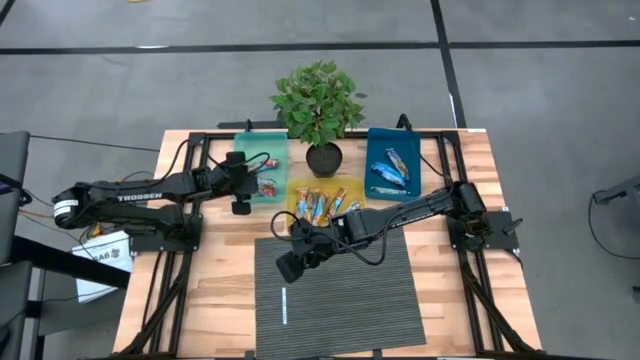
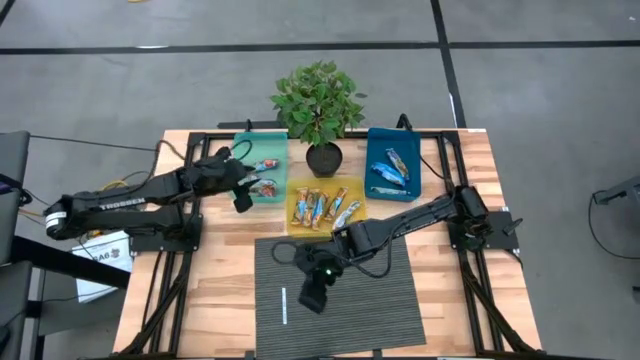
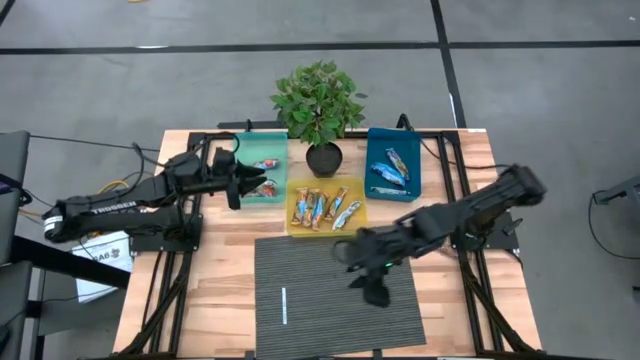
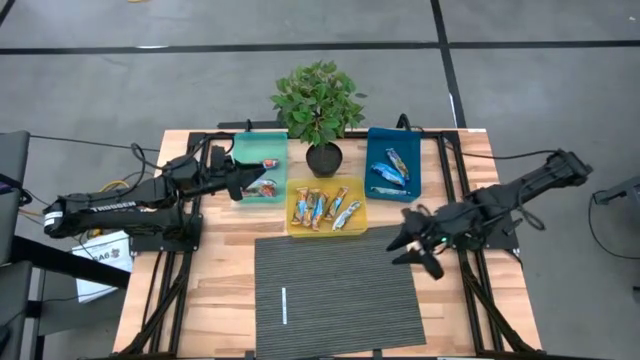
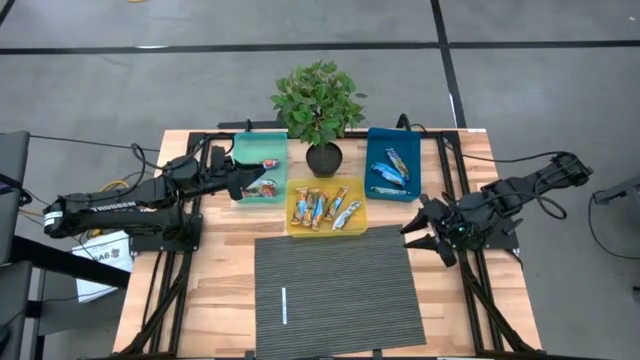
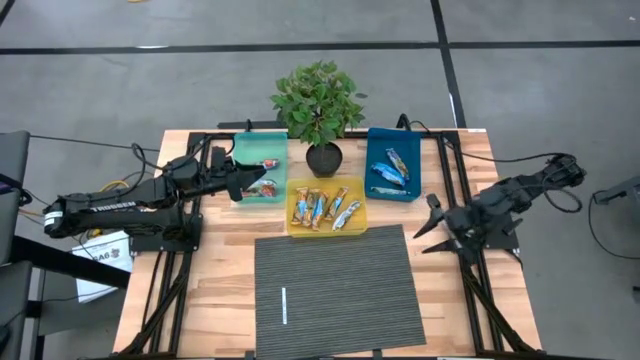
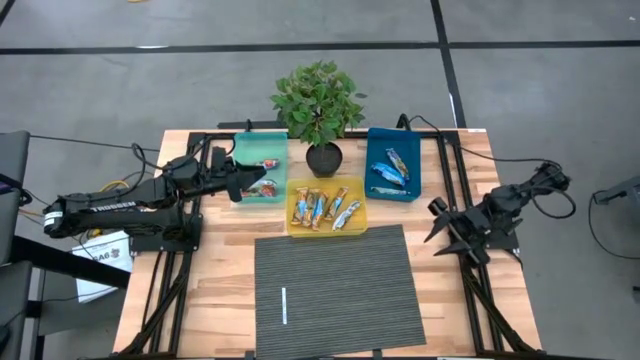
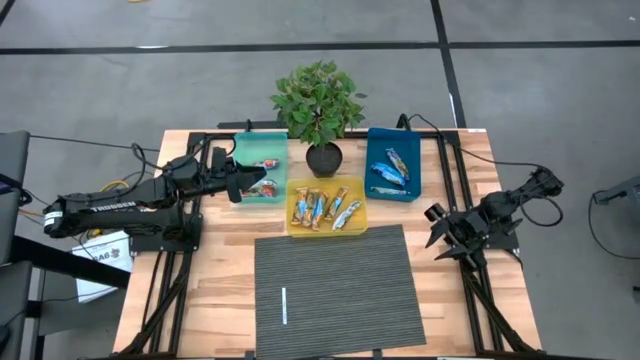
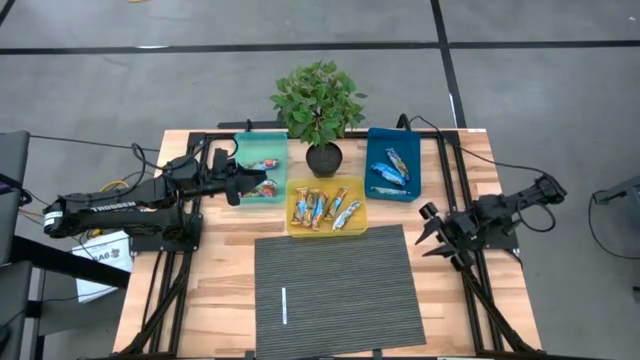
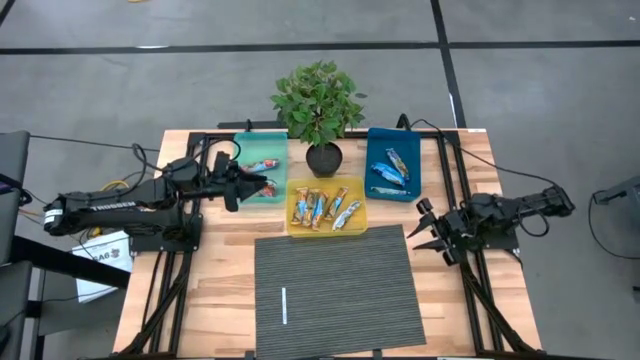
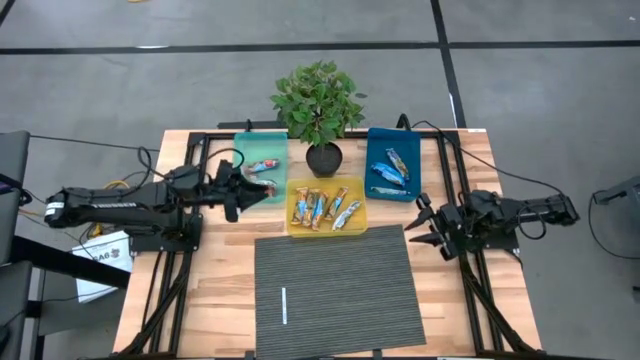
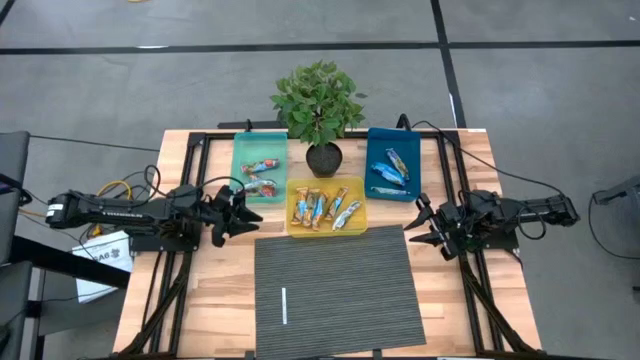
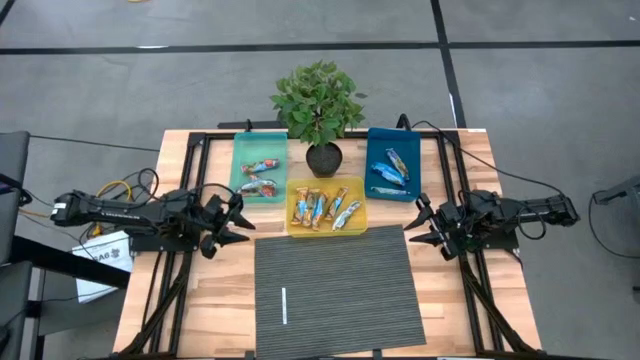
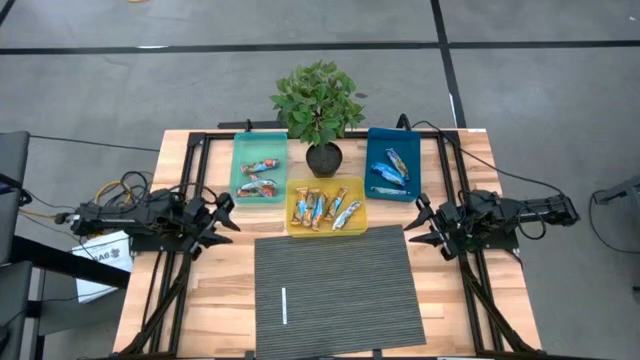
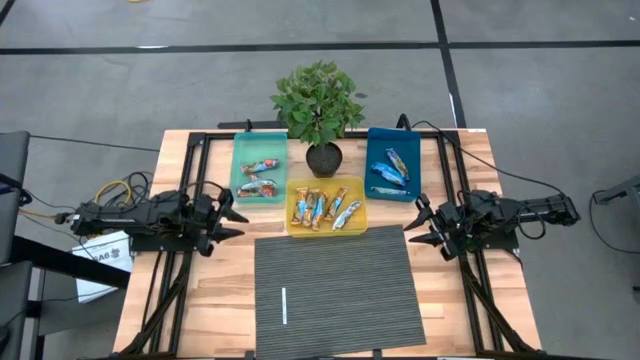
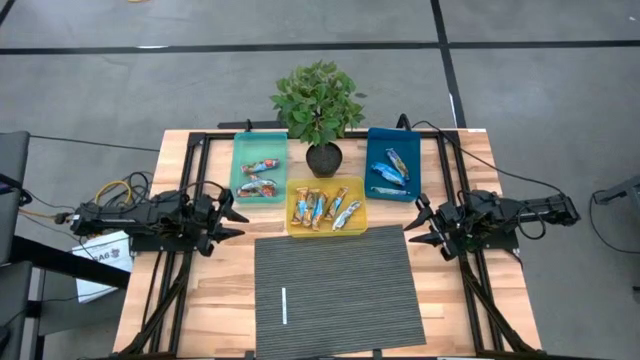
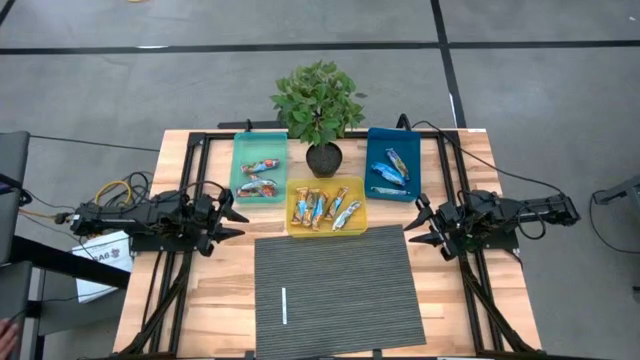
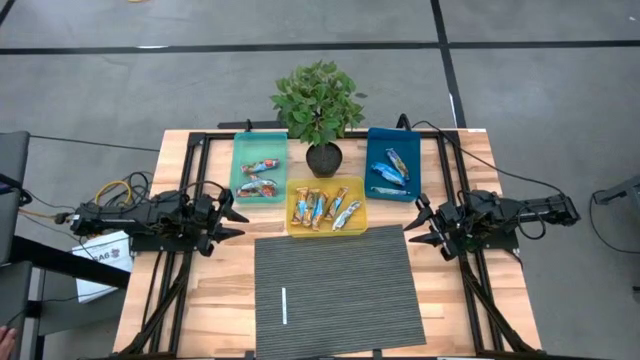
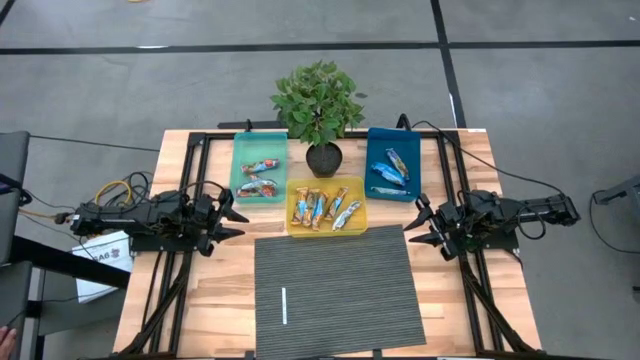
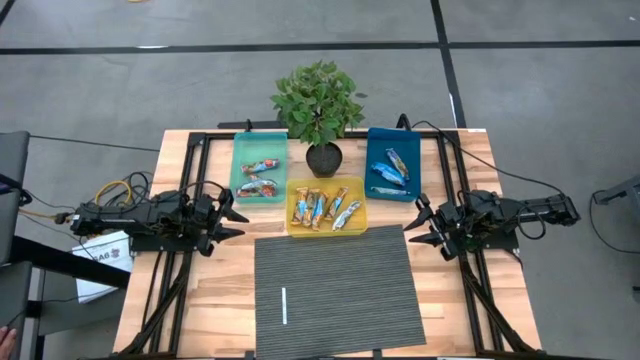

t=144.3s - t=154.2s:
Task: Pick and place Granola Bars by type
Return to Home Position

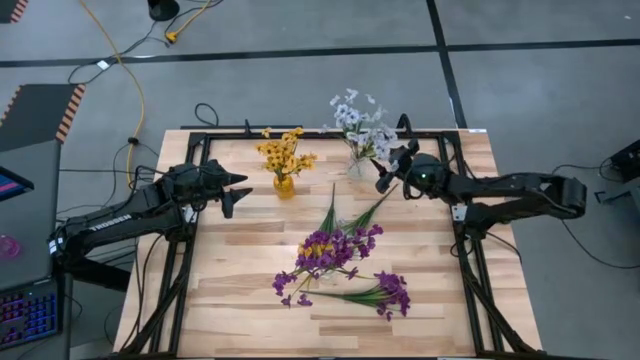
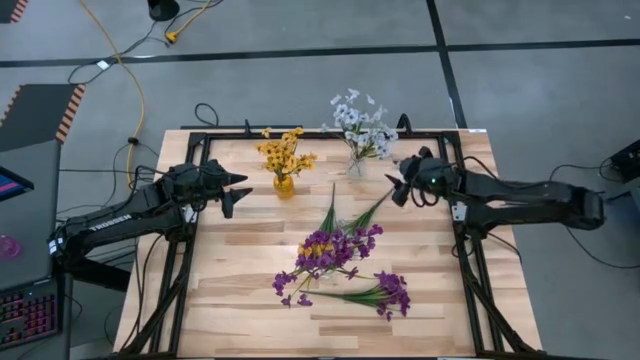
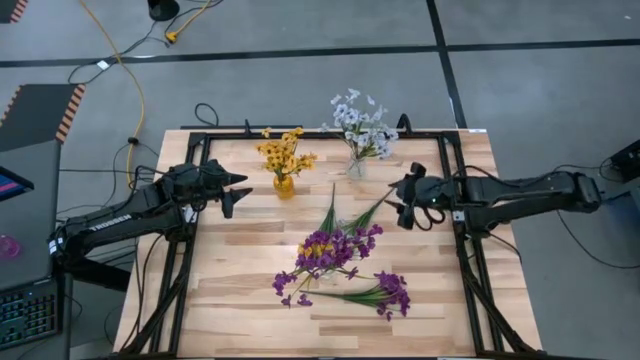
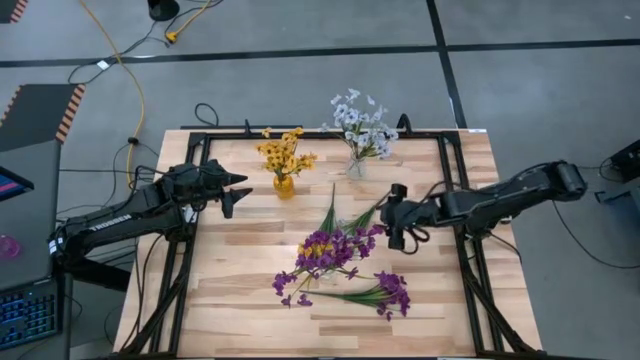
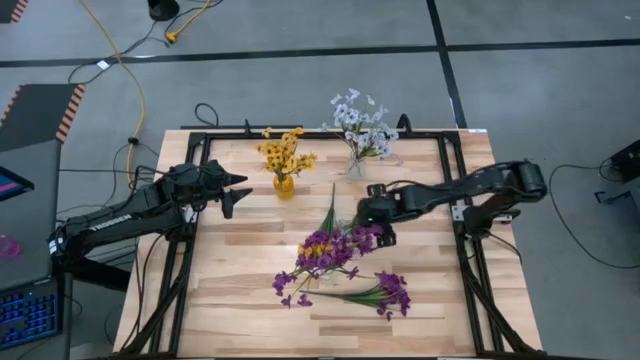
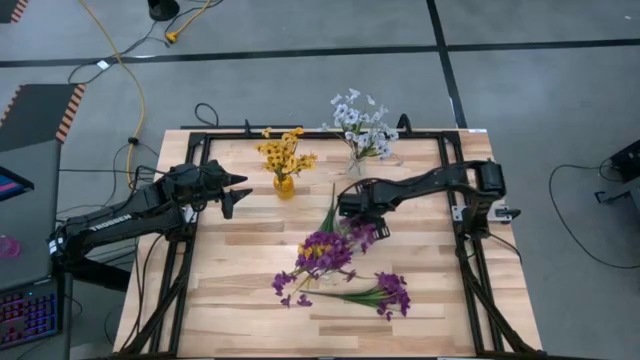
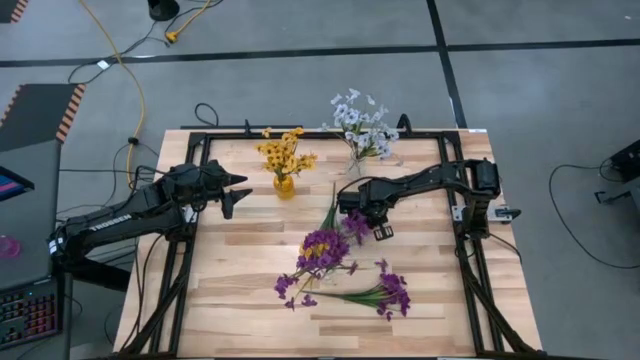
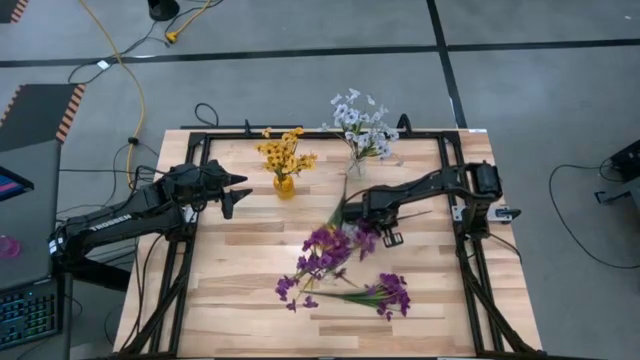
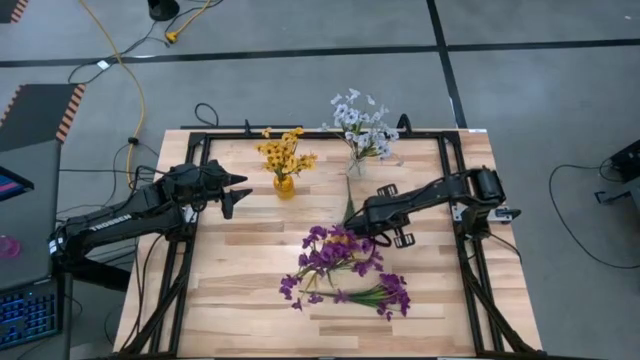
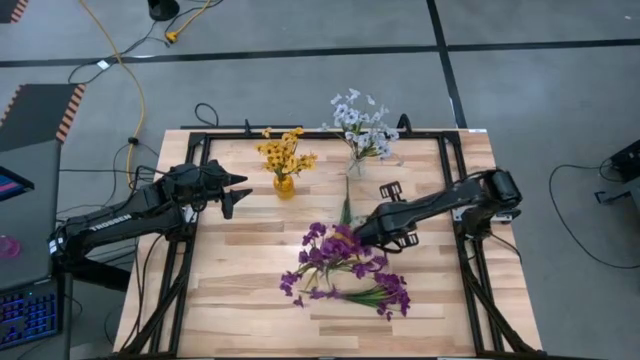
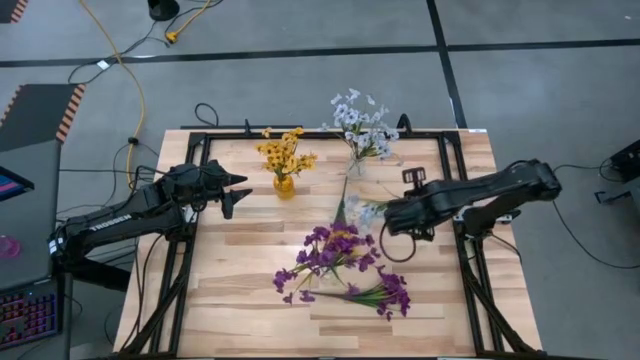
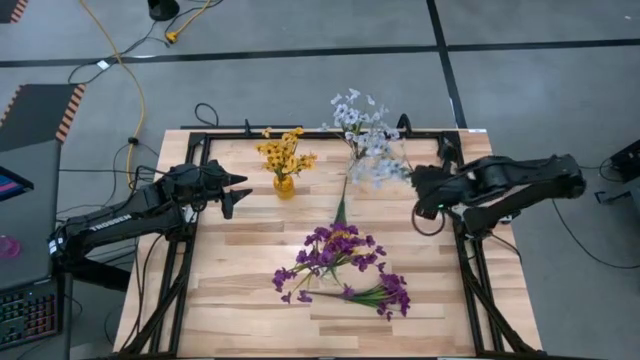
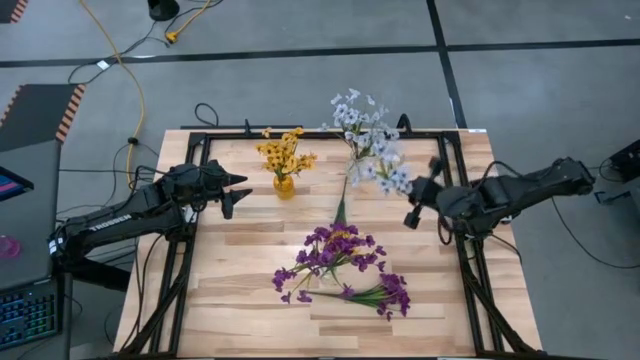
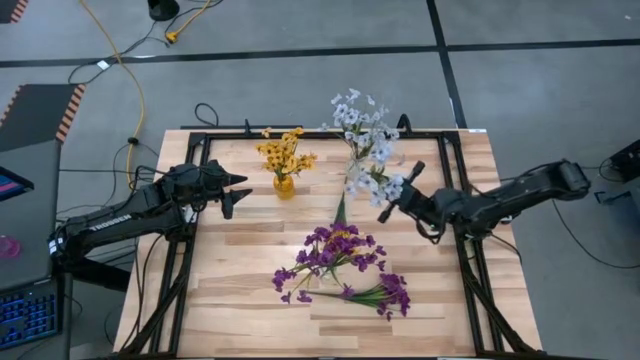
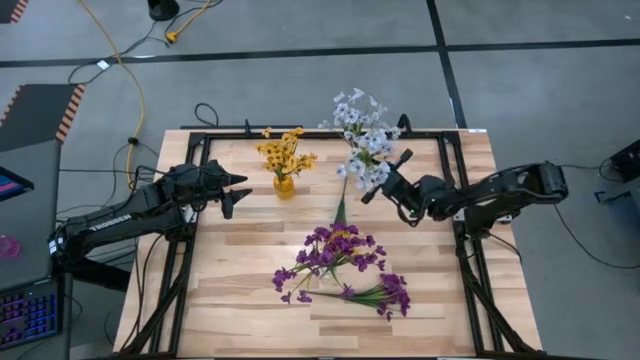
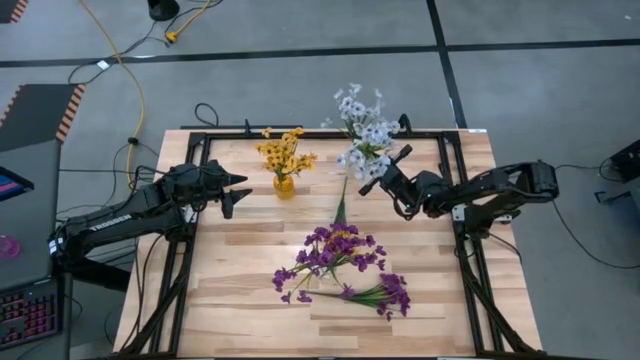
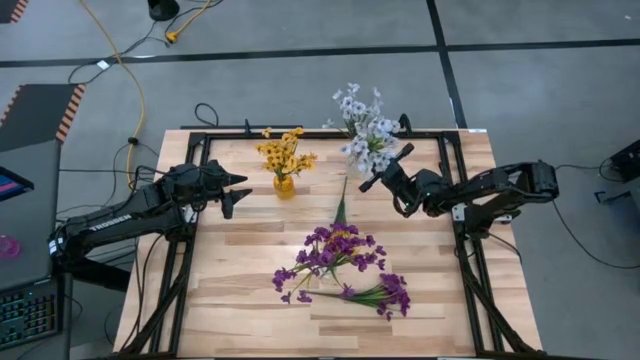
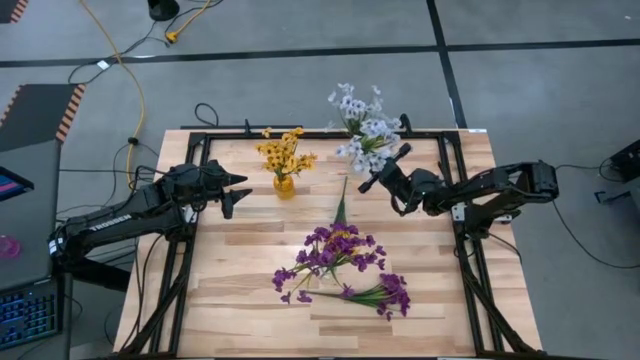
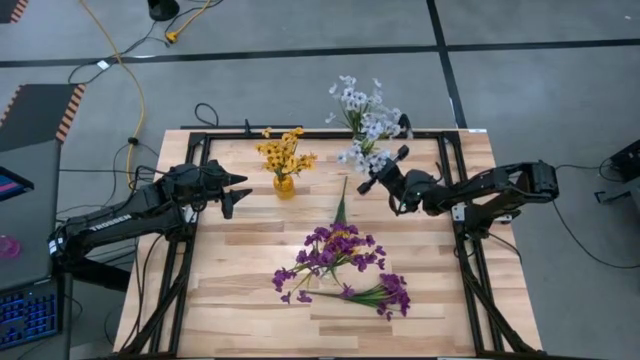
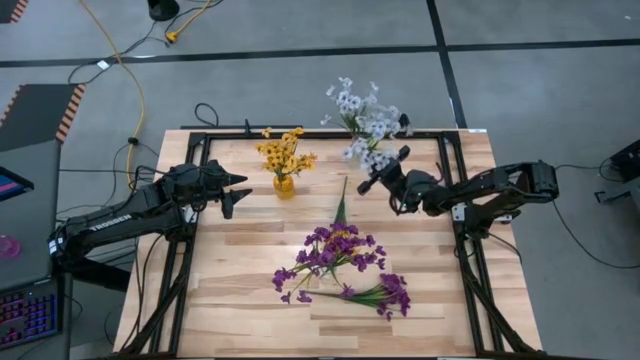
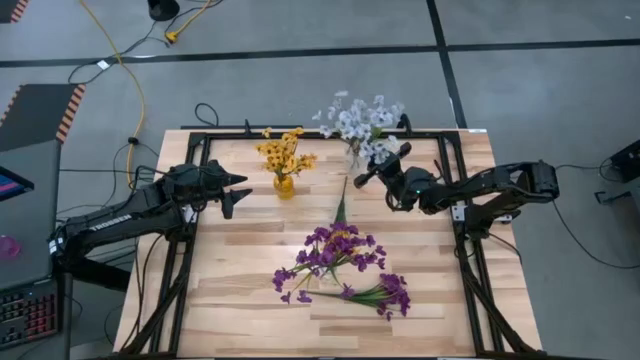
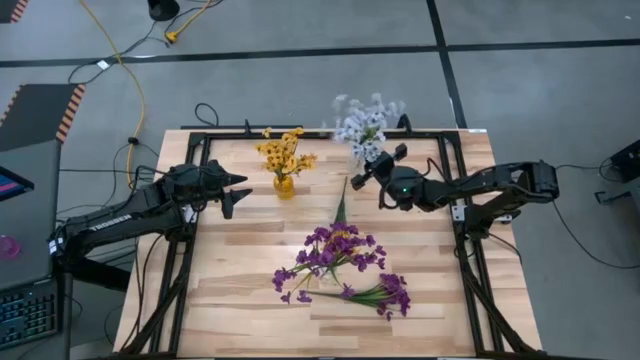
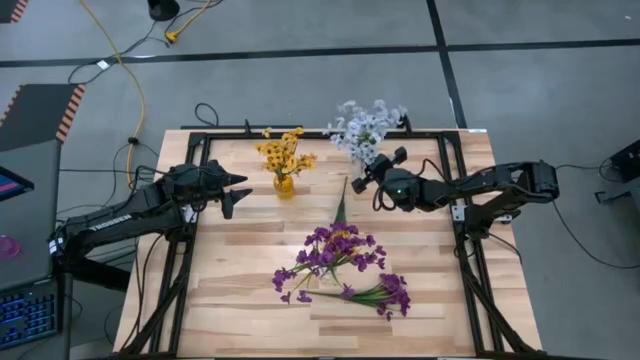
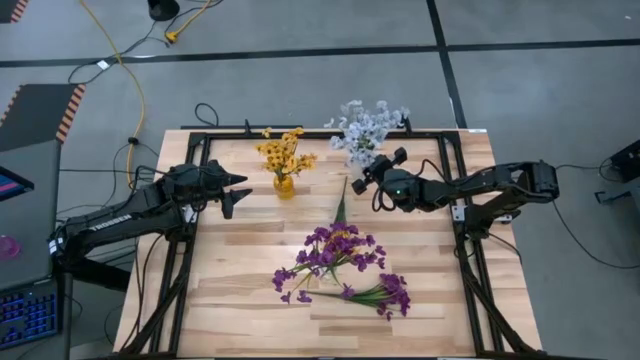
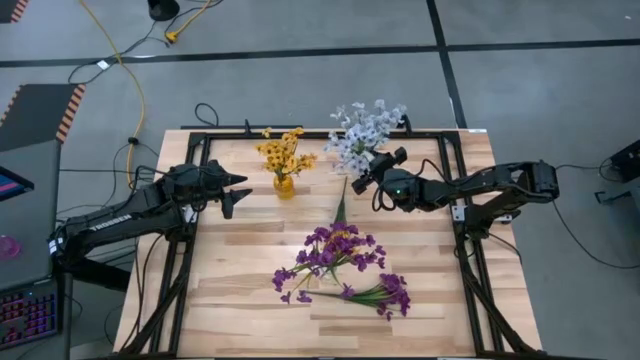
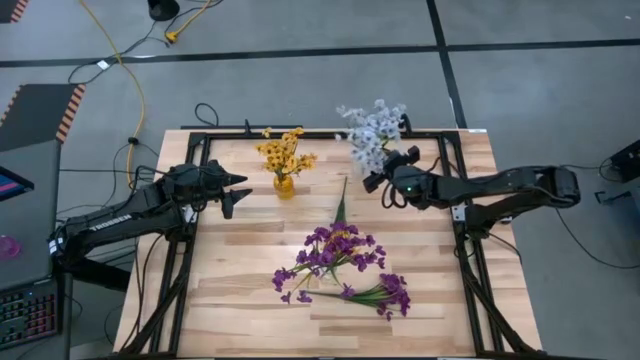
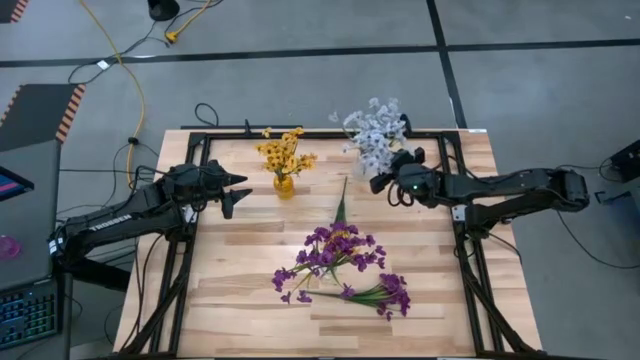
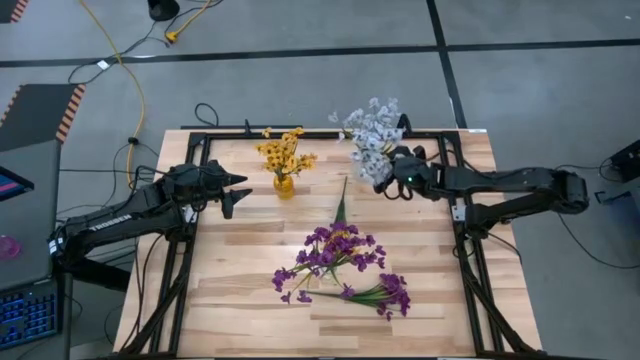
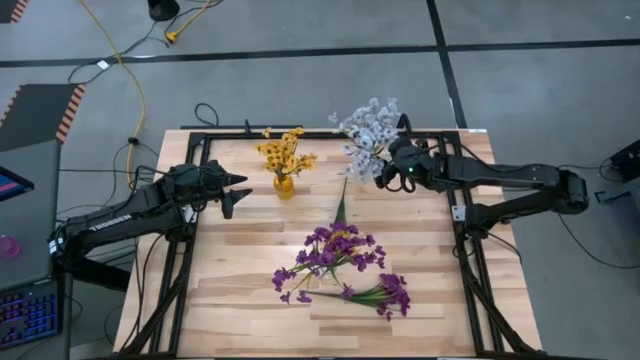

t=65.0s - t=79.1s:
Task: Sort flowers into vase by color
Put the white flowers into the top transparent vase
